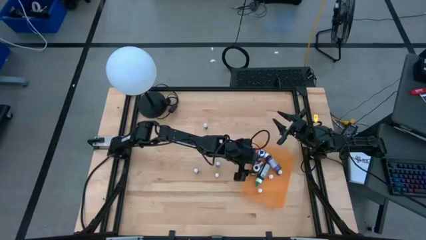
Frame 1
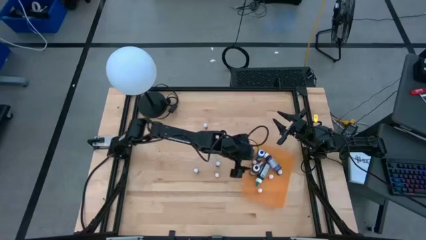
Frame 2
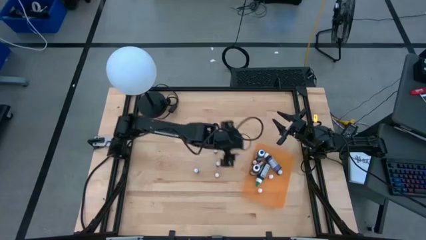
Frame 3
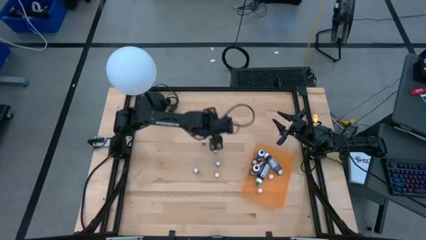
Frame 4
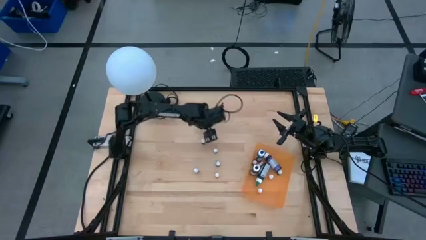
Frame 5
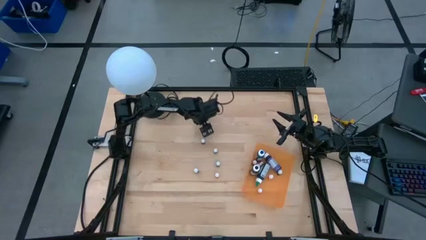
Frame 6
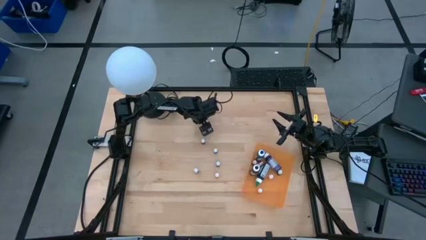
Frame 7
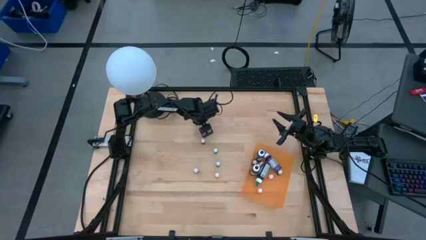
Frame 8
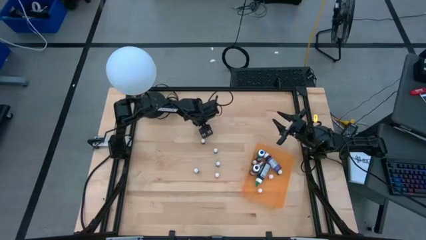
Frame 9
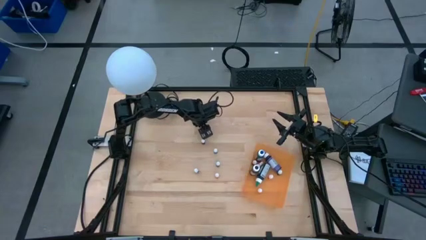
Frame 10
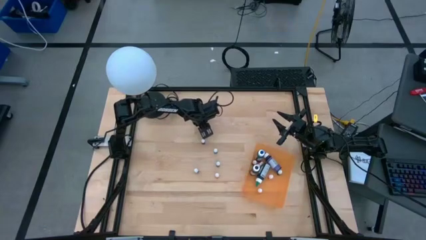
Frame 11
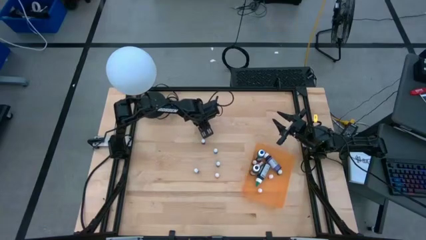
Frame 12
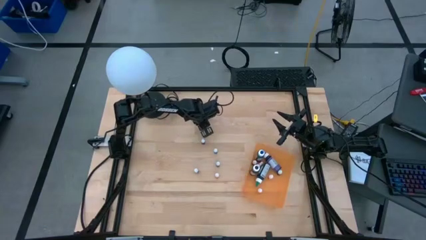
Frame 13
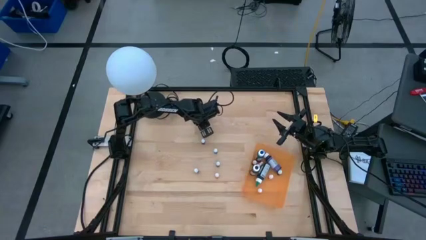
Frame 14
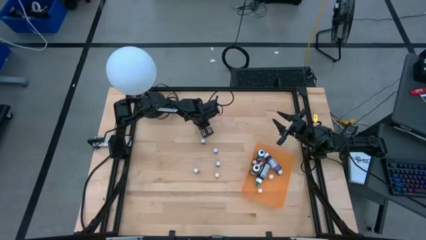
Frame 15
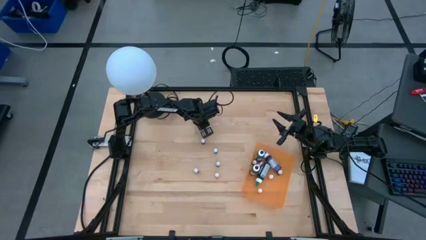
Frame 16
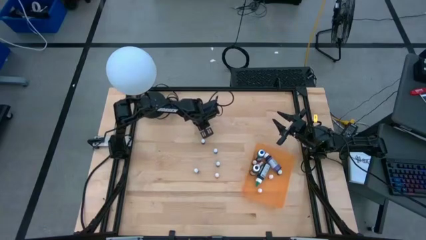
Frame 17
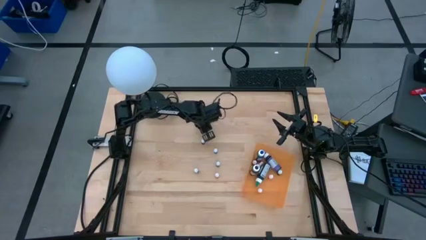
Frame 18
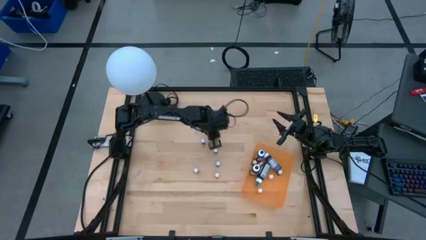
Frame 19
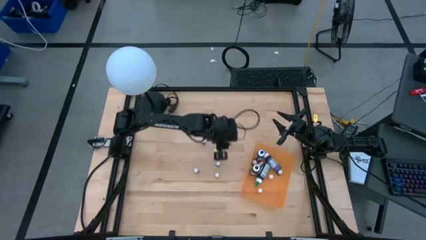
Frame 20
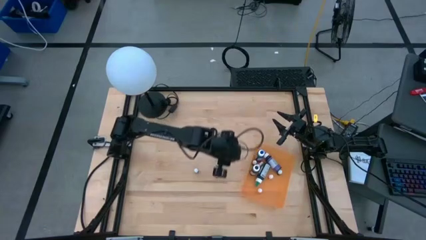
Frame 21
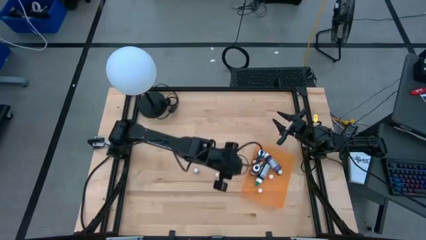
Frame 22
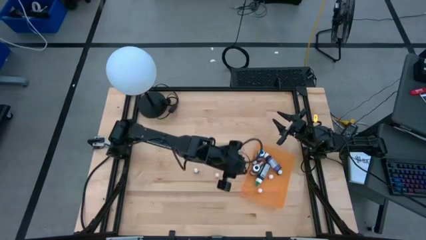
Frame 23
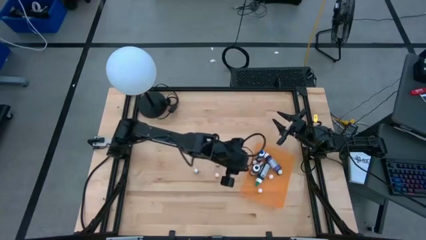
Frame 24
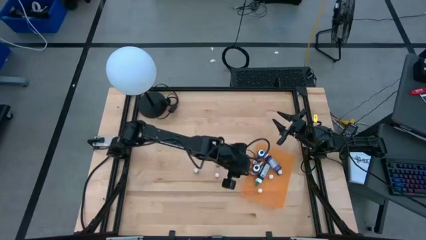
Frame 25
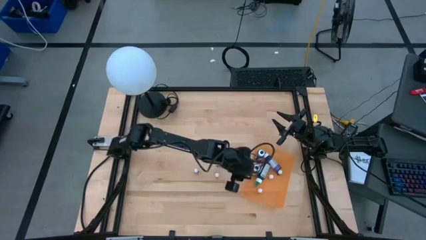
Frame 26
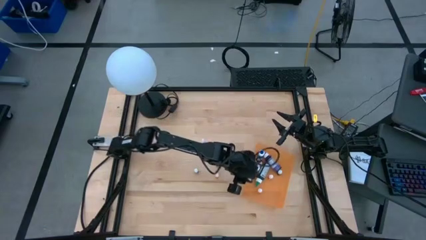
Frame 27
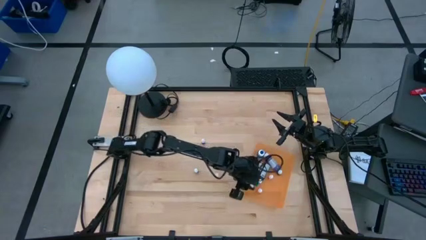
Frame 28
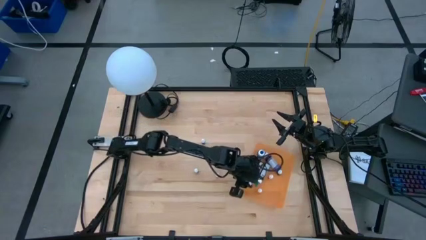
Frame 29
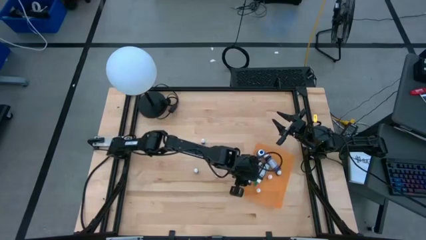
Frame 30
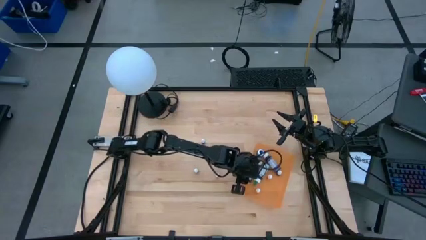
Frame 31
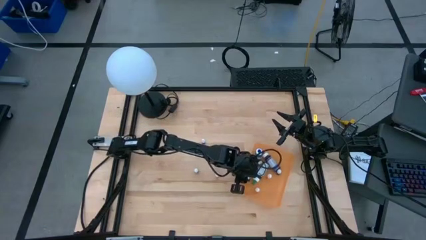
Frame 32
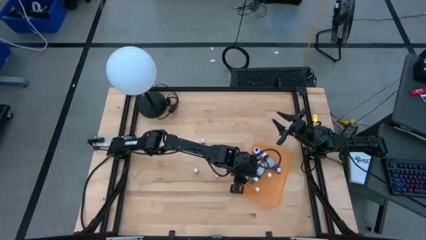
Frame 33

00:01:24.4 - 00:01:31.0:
Task: Pick & Place food coloring
Put the top black food coloring bottle into the orange bin

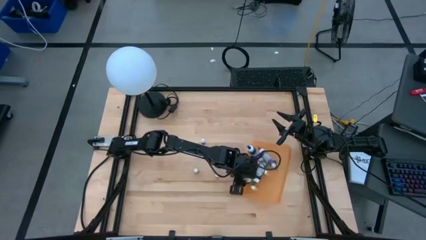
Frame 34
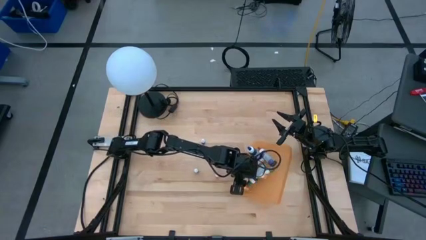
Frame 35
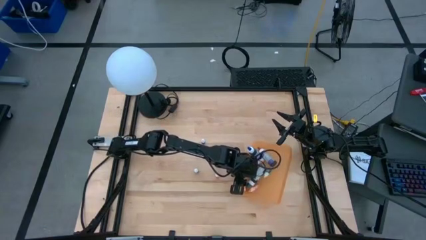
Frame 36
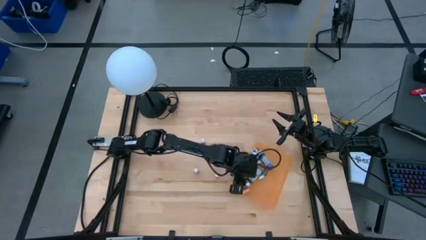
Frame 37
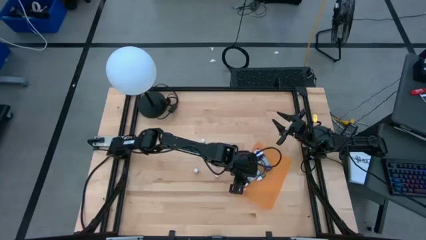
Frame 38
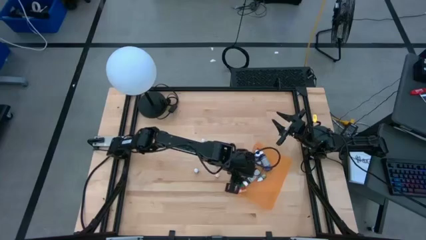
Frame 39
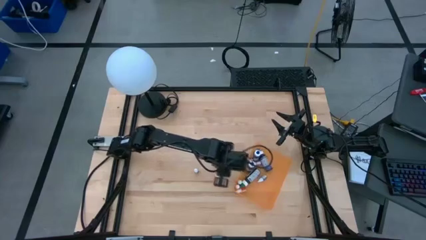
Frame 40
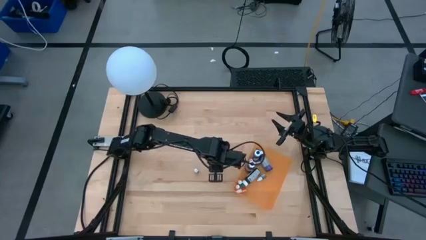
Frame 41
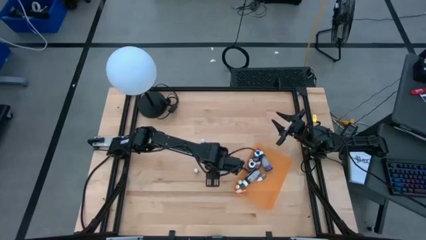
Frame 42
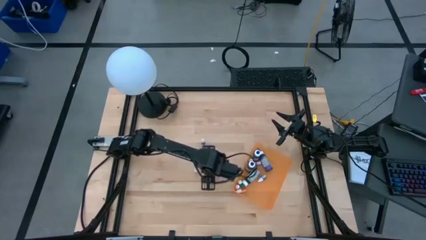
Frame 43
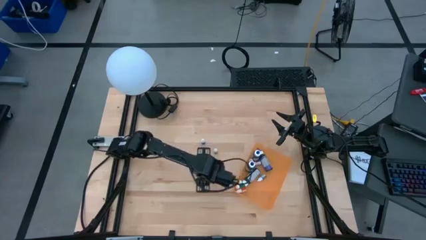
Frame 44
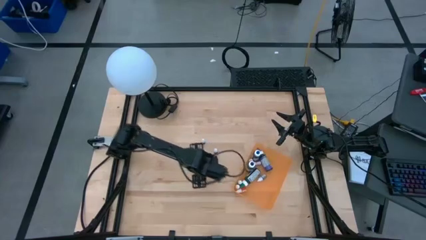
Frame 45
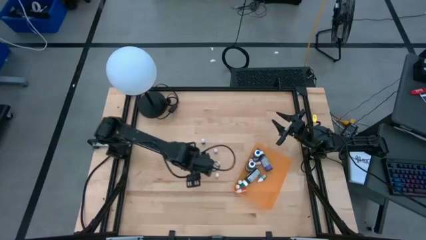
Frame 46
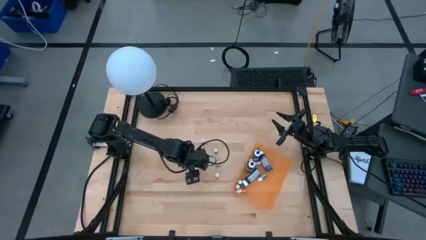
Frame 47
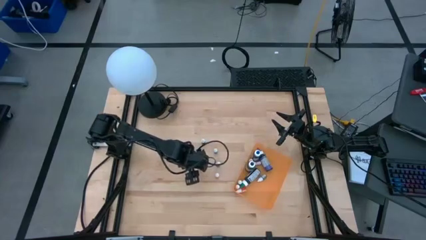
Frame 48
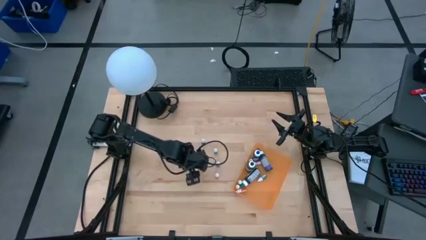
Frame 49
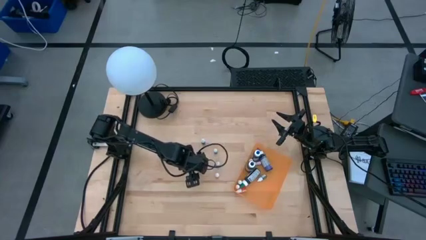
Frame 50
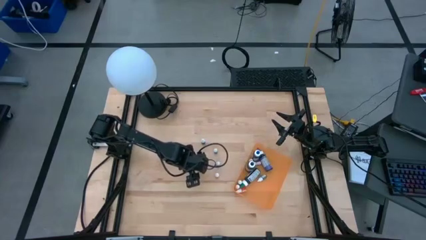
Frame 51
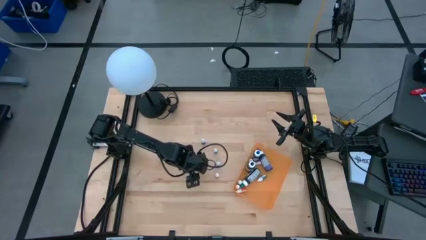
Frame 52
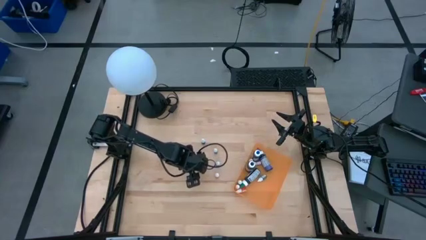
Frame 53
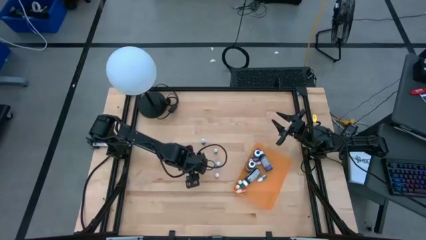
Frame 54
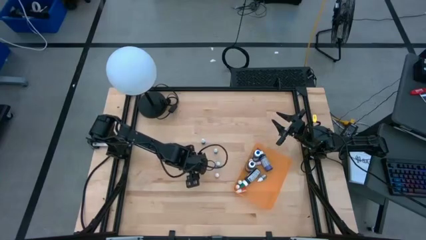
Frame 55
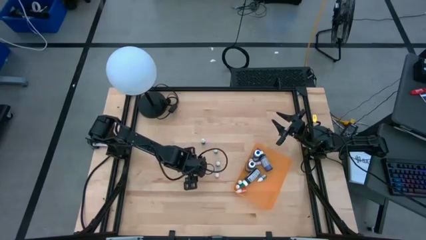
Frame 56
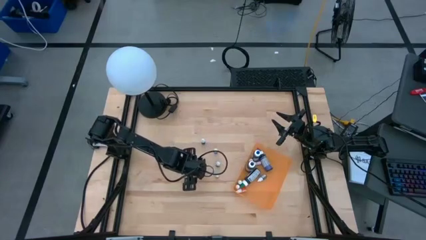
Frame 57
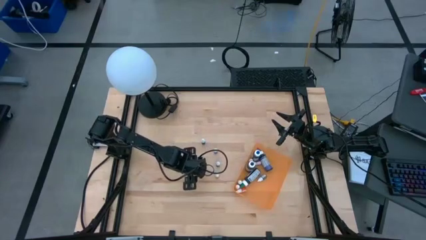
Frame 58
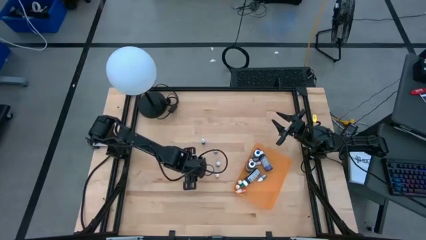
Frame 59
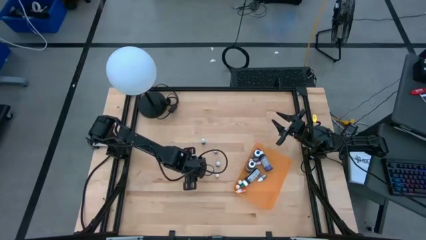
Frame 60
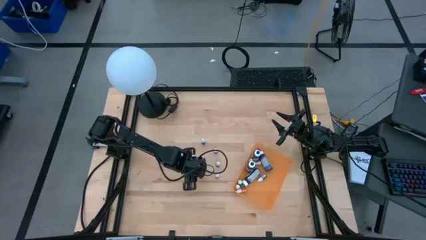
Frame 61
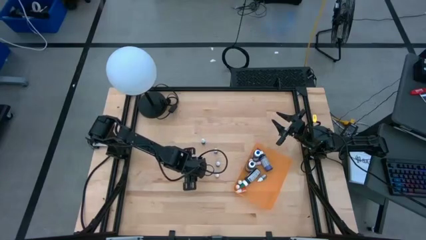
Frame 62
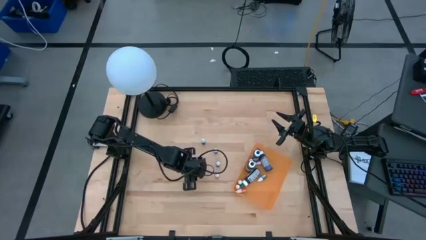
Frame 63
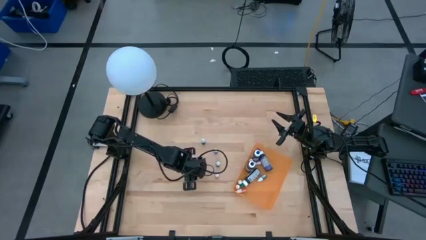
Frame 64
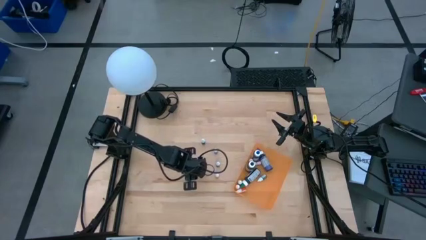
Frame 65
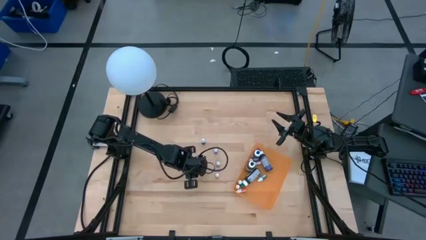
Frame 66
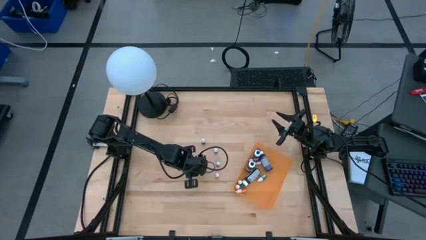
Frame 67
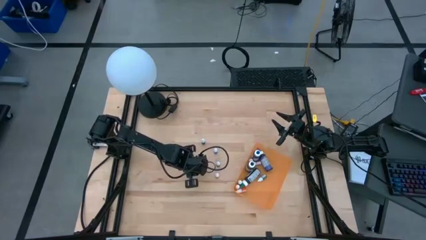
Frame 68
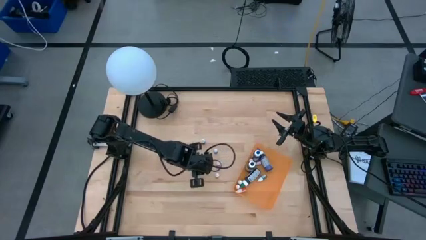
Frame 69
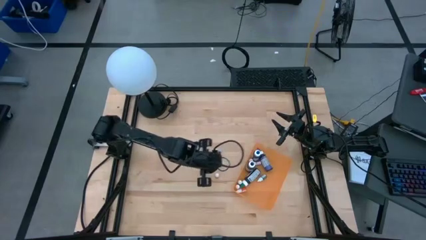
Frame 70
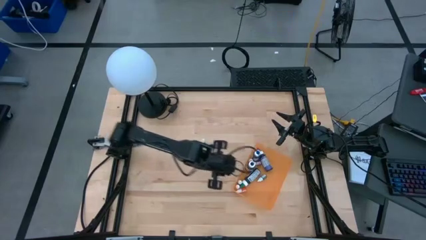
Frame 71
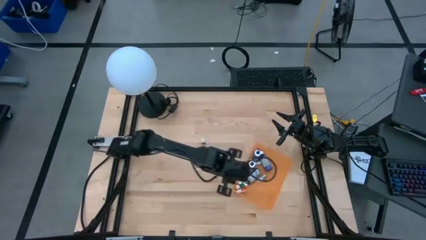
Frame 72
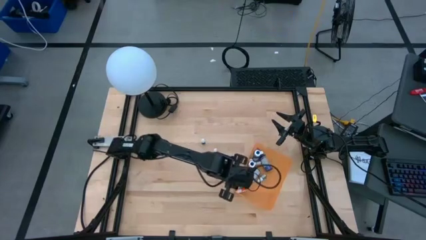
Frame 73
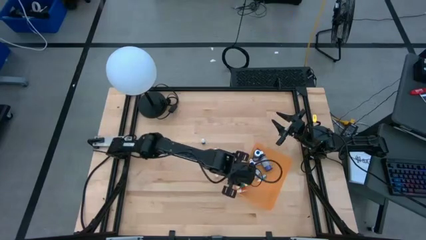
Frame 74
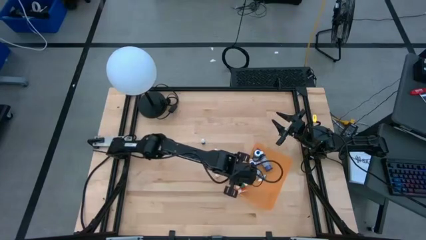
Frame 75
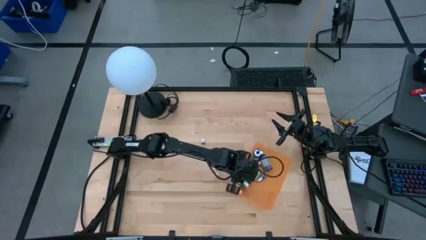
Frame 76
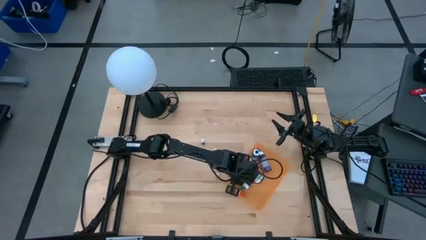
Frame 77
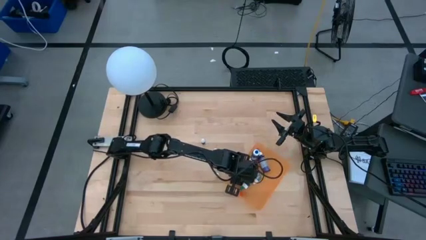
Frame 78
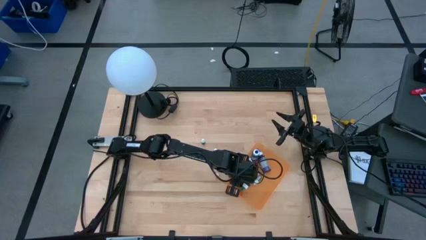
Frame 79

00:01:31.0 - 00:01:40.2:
Put the small red food coloring bottle into the orange bin

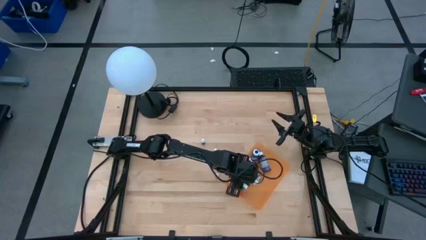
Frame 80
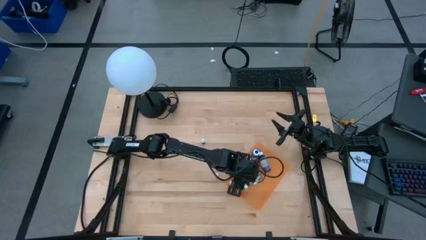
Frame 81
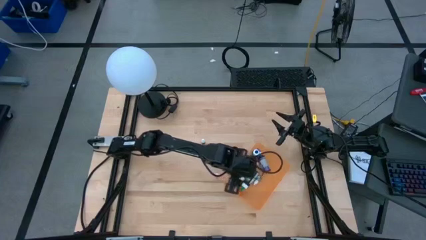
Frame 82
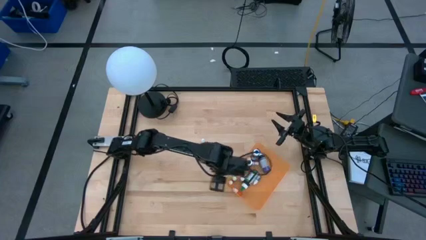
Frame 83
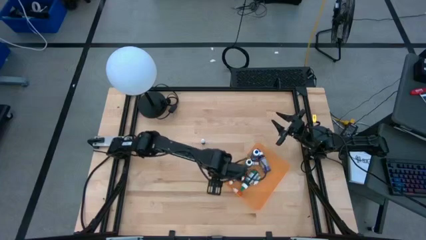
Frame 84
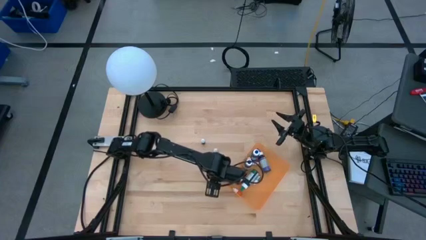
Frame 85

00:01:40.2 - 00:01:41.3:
Put the small yellow food coloring into the orange bin
